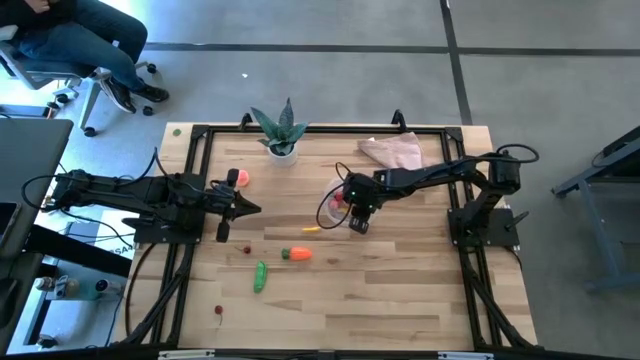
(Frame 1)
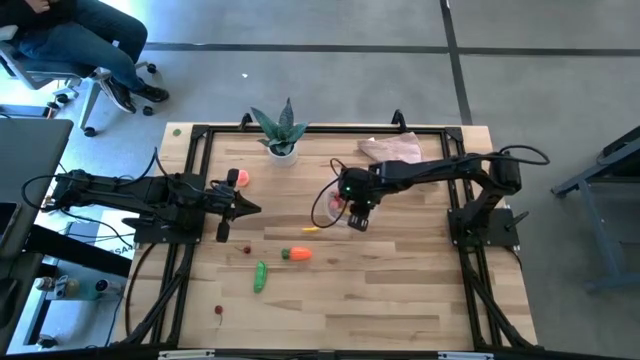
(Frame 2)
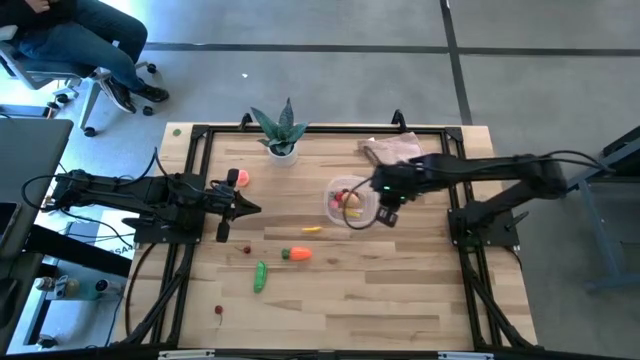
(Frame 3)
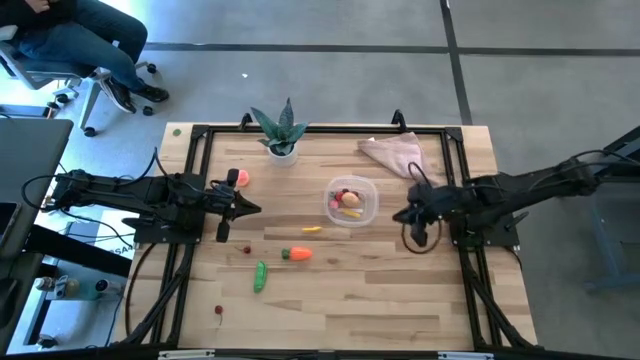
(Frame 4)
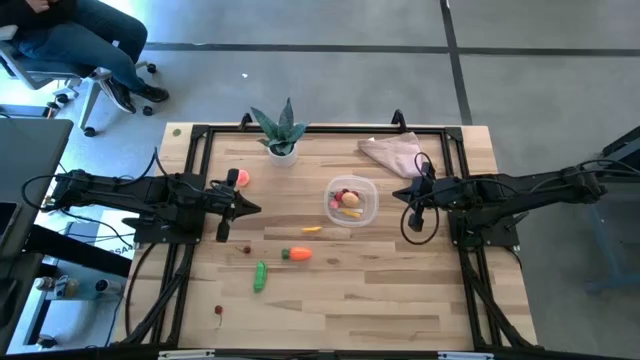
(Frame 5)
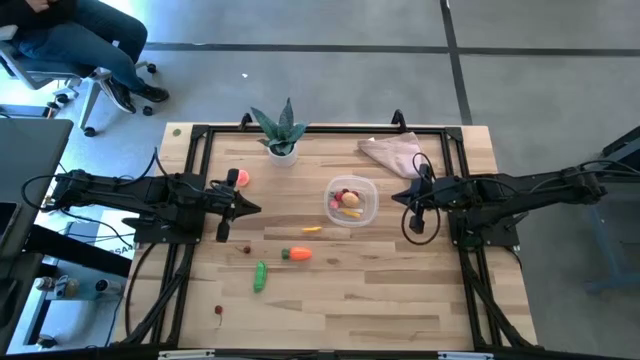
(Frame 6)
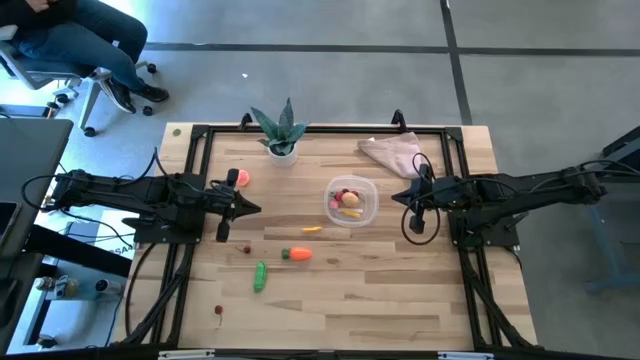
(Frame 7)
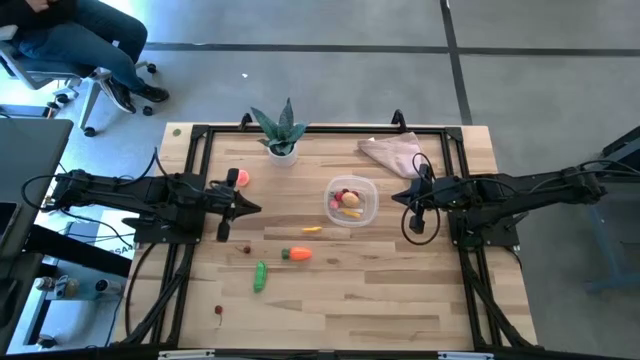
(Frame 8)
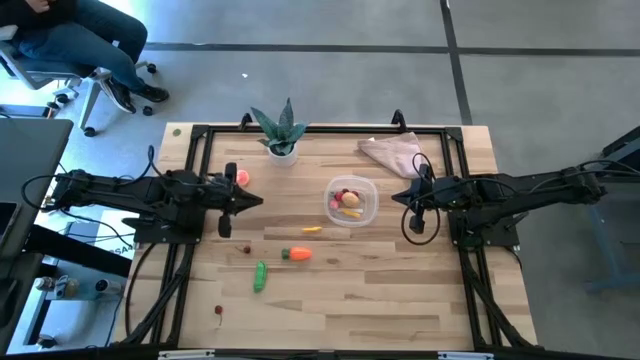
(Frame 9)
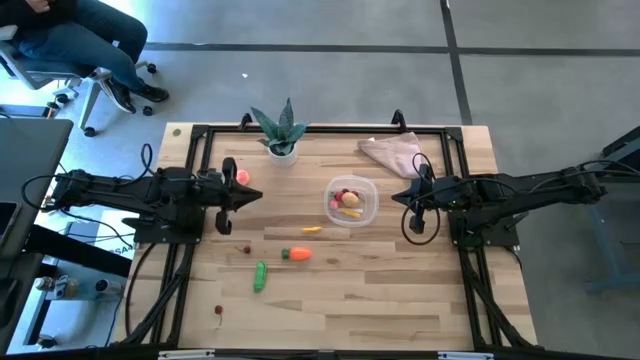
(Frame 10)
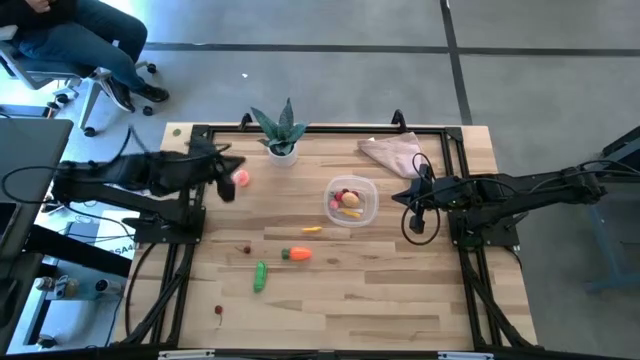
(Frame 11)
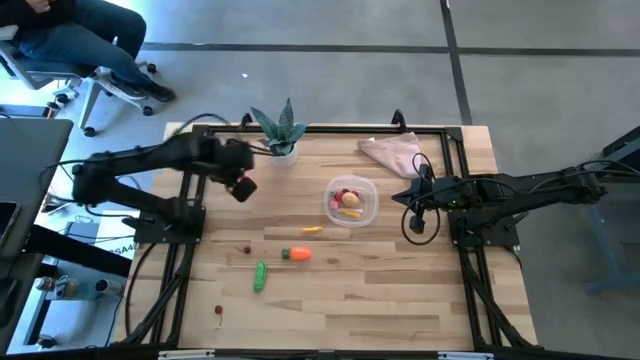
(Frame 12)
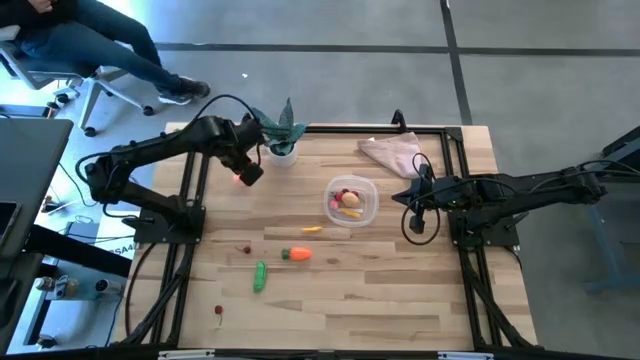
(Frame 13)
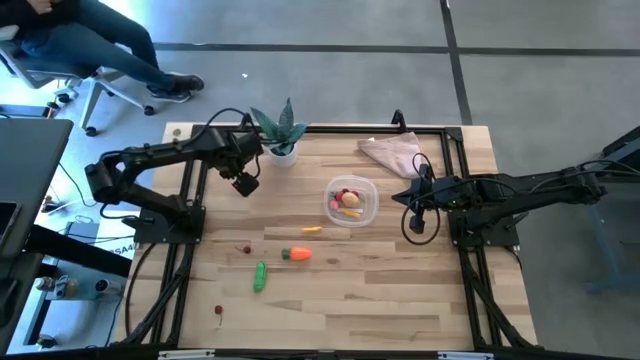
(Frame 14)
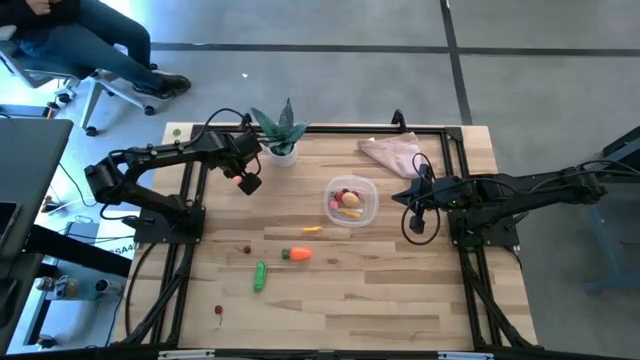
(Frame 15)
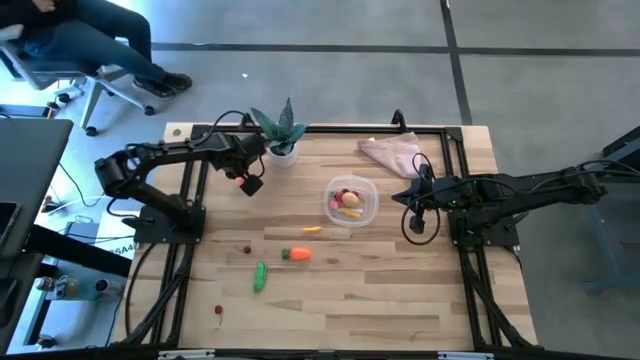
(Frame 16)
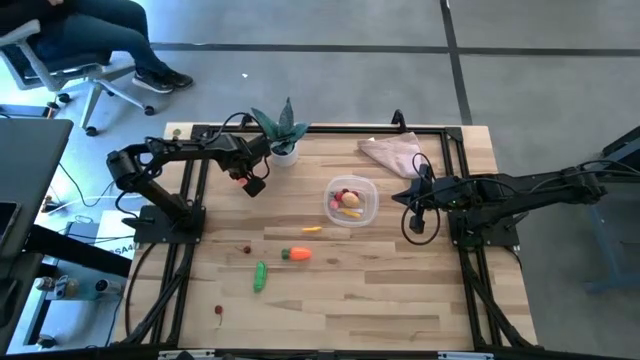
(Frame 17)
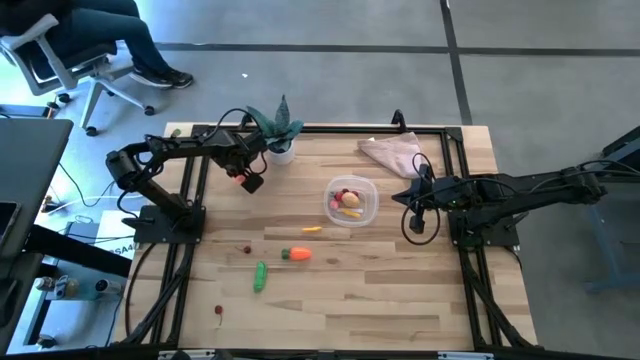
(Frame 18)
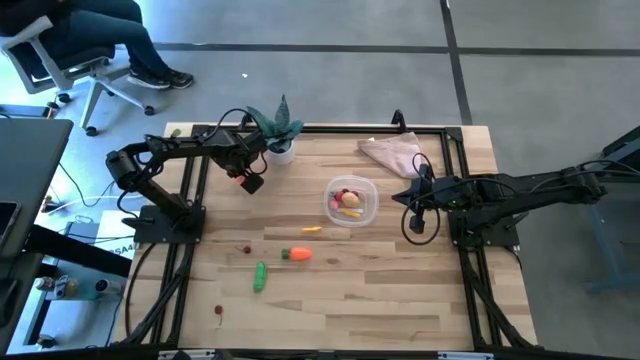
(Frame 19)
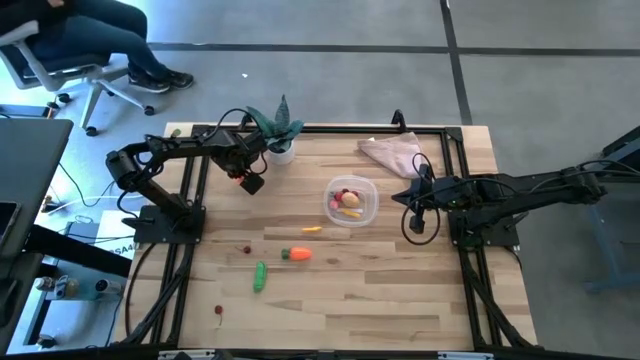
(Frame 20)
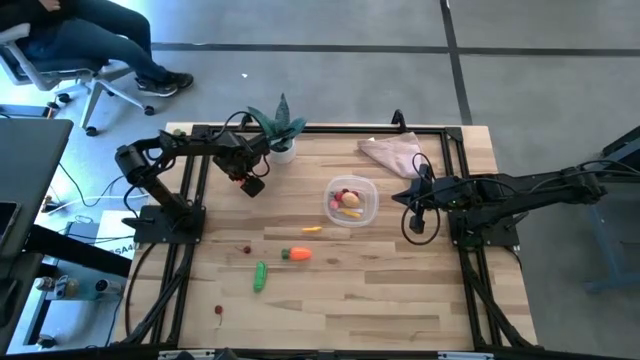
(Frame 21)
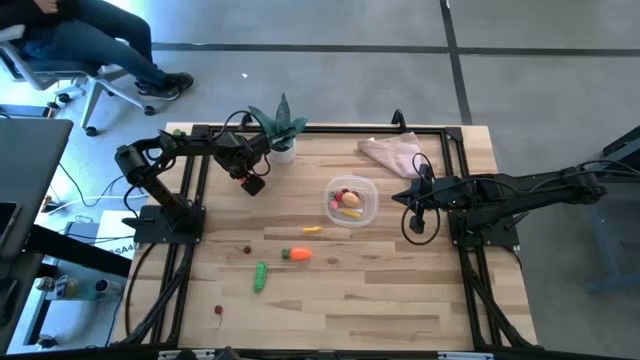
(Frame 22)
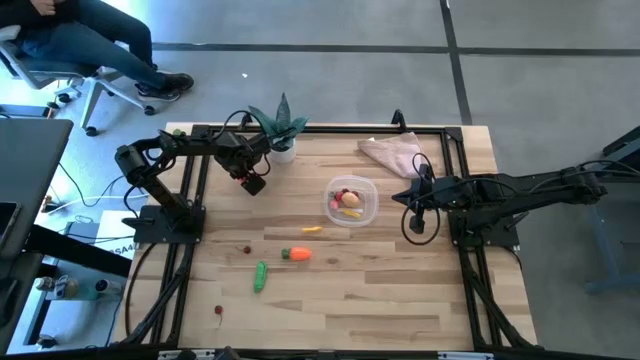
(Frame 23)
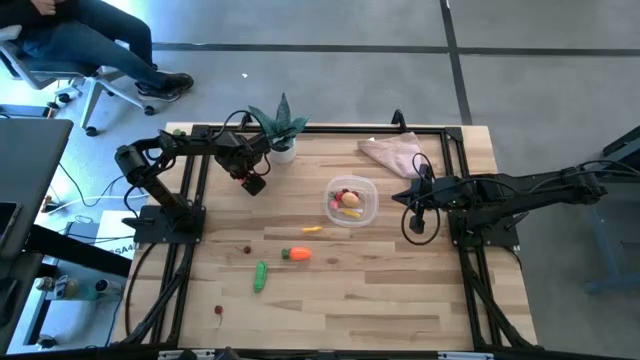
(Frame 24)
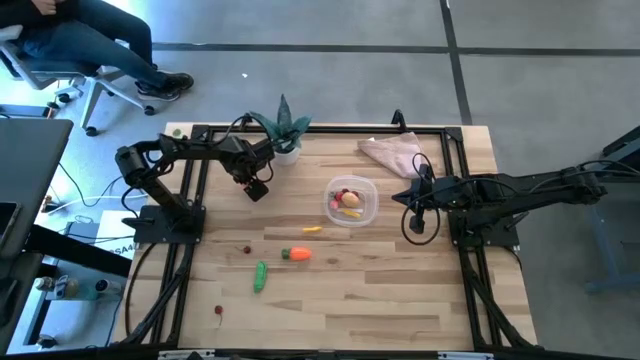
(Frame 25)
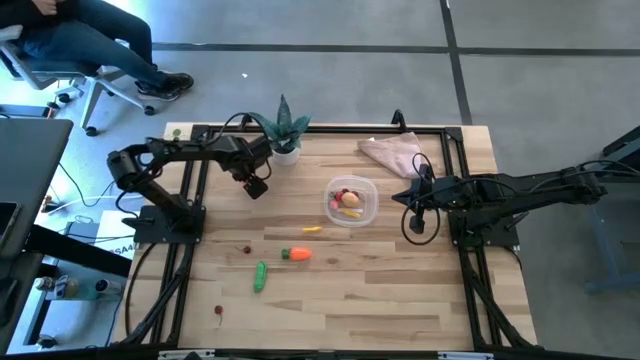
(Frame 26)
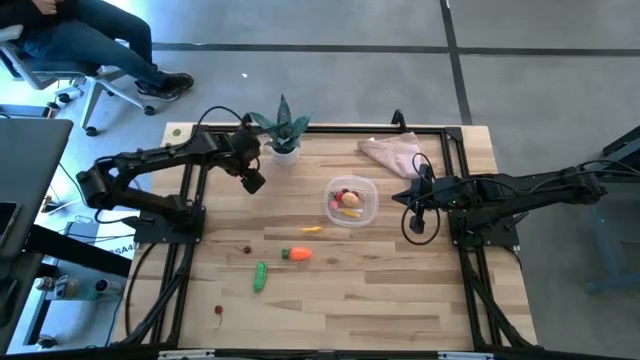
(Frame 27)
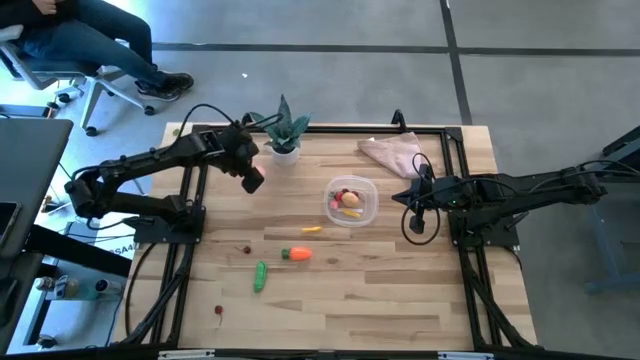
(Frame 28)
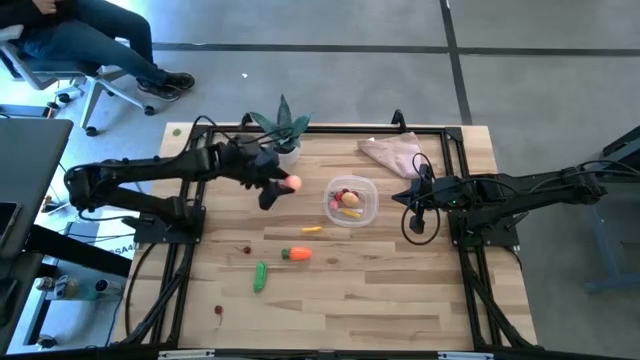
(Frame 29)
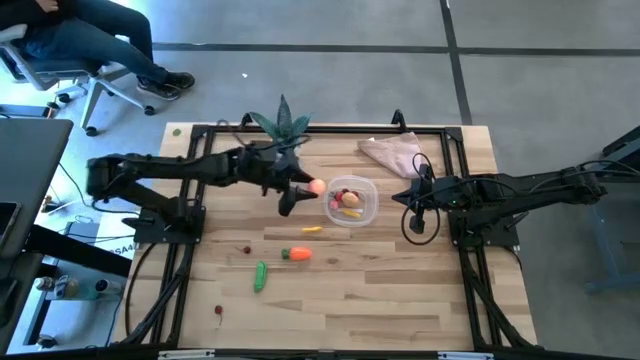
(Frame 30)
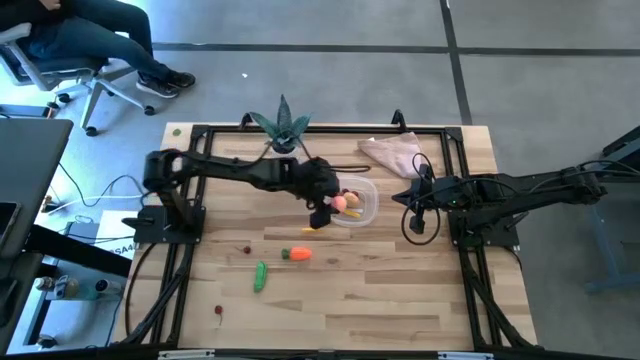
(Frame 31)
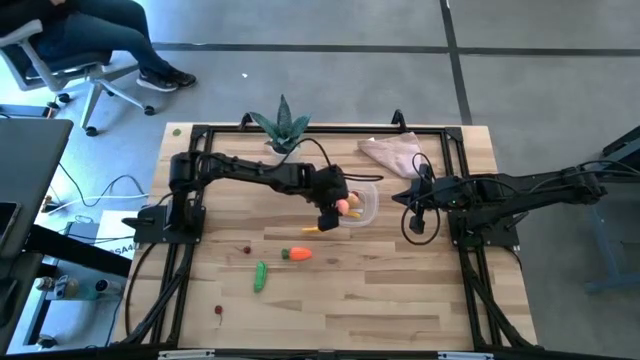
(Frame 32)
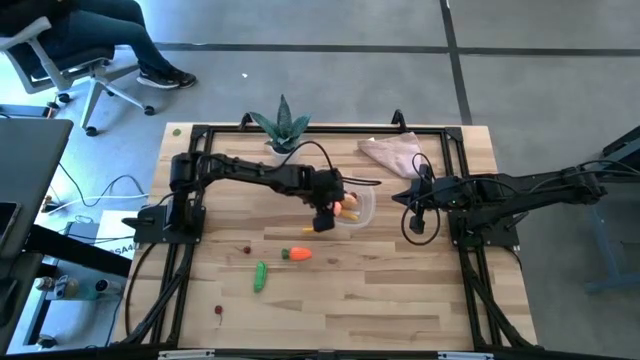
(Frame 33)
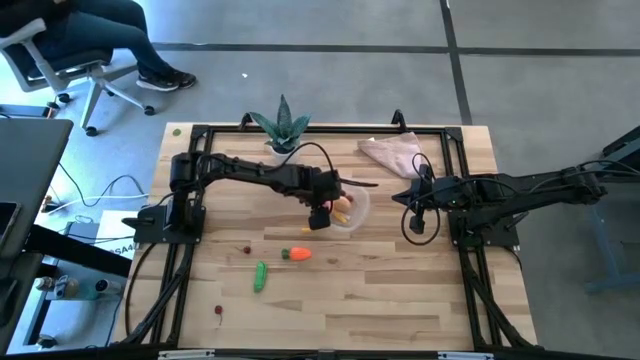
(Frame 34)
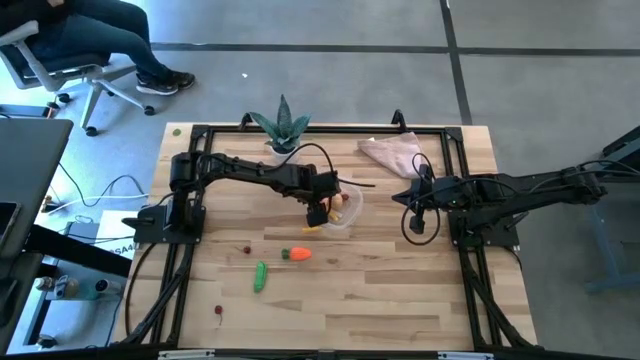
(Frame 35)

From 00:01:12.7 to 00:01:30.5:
Task: Pick and placing Produce into tupperware
Put the pink peach into the transparent bin

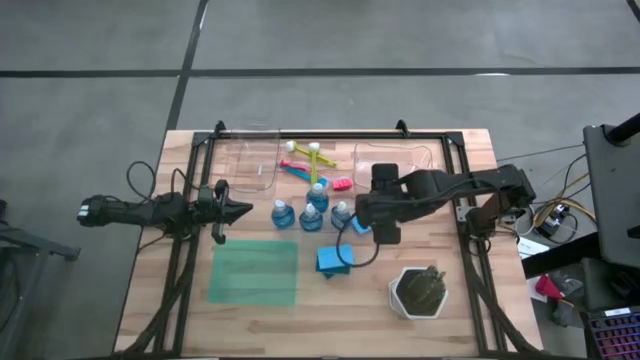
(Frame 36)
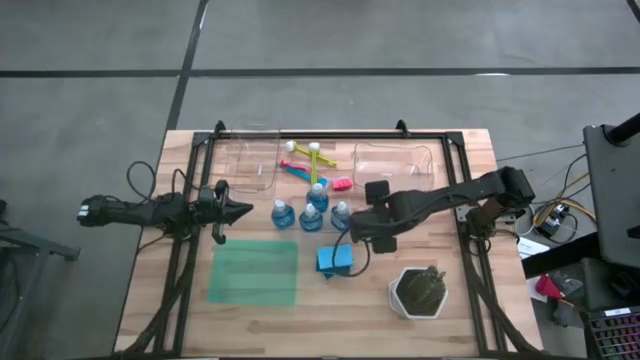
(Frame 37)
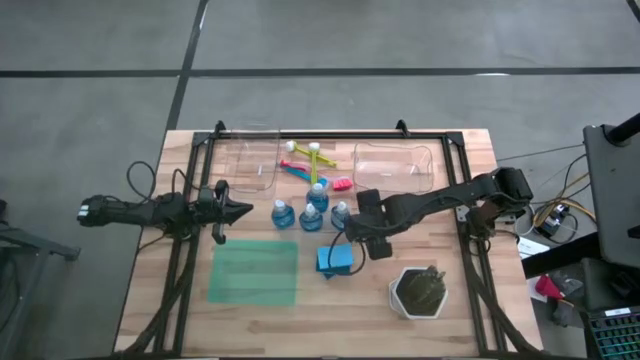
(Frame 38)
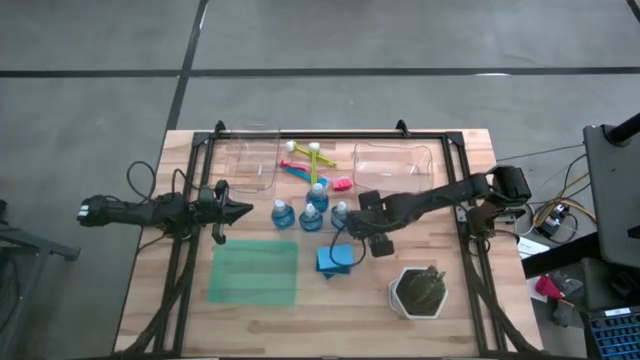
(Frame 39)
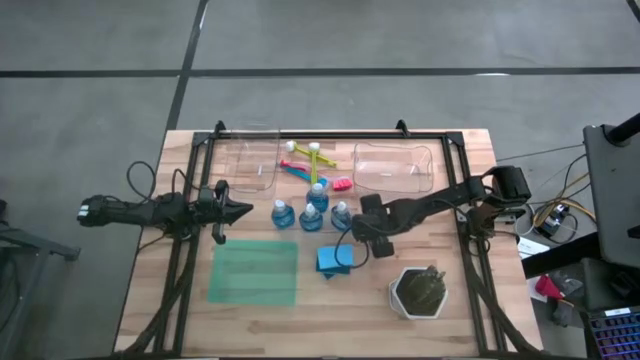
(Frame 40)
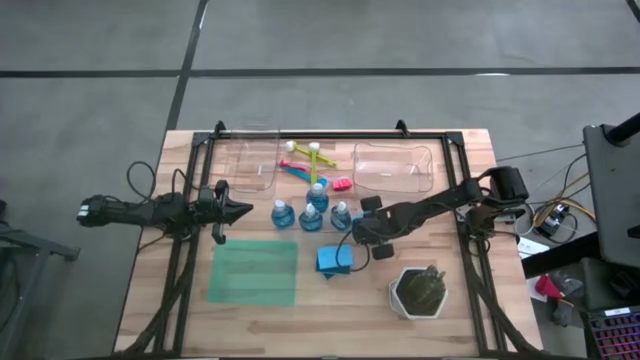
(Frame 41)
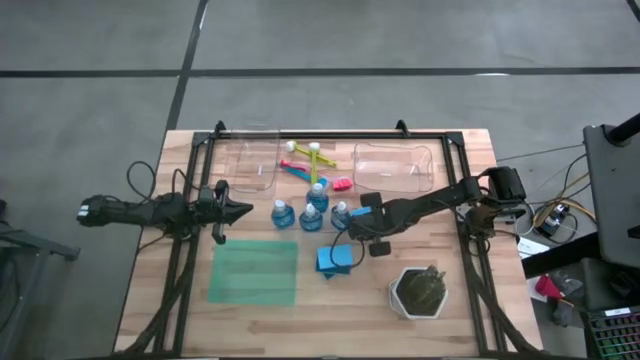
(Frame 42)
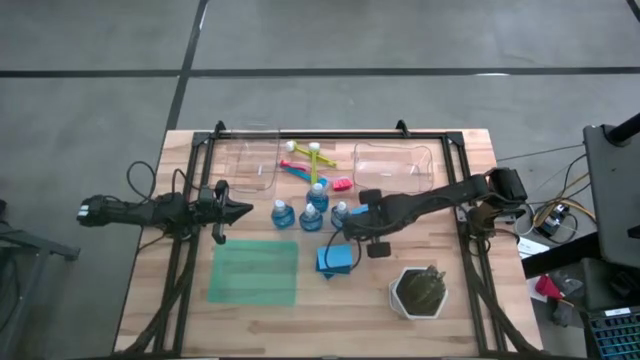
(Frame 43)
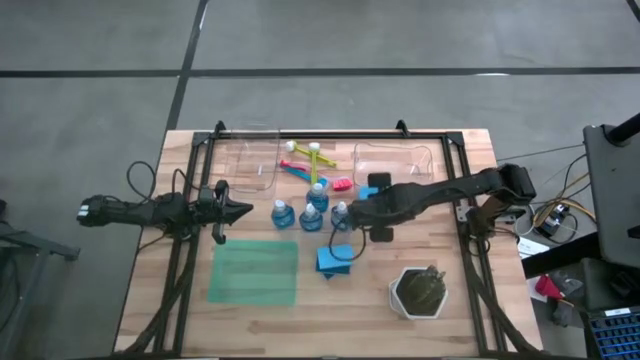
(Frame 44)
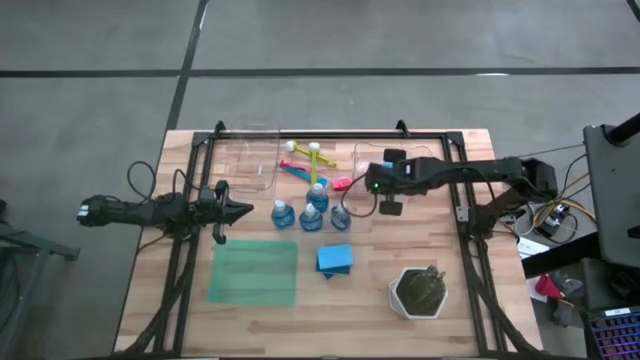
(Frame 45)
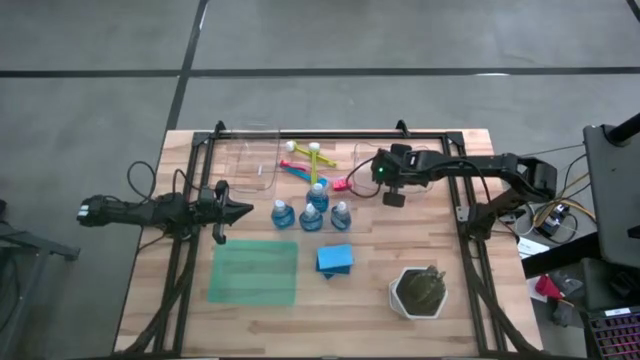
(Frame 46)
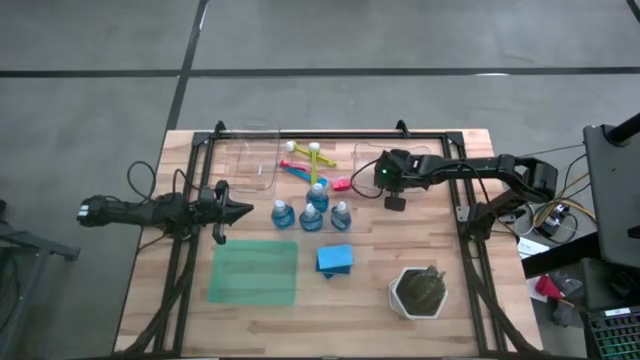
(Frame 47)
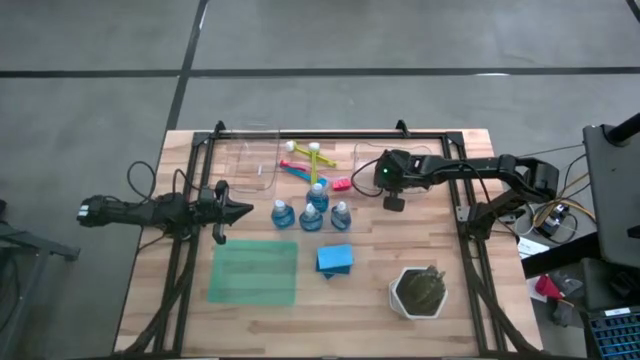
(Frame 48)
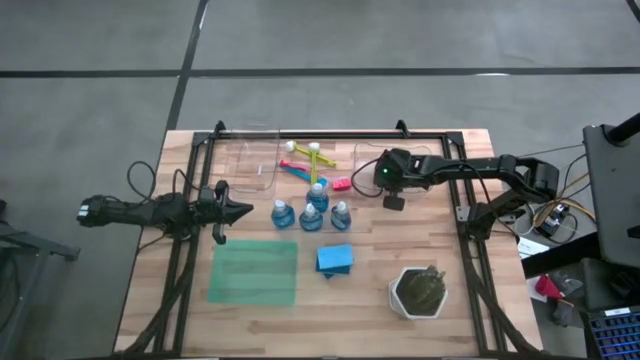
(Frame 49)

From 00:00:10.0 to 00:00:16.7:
Task: Pick & Place Kitchen Sink Supplies
Put the blue sponge into the right transparent bin
